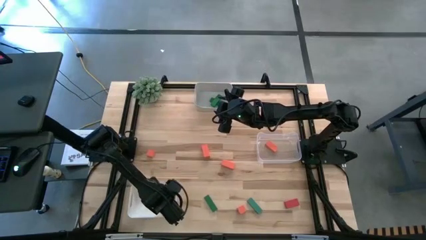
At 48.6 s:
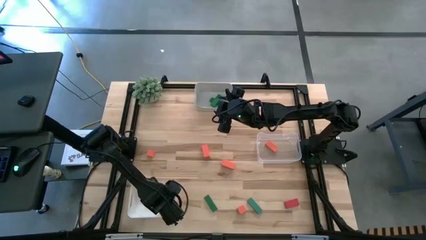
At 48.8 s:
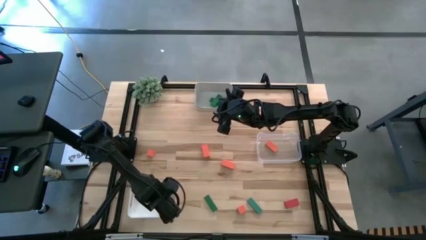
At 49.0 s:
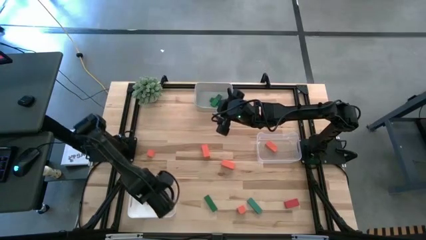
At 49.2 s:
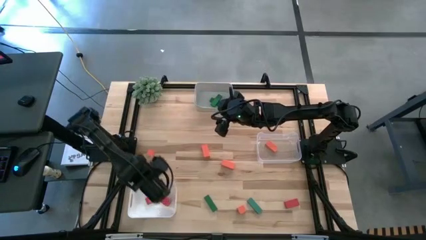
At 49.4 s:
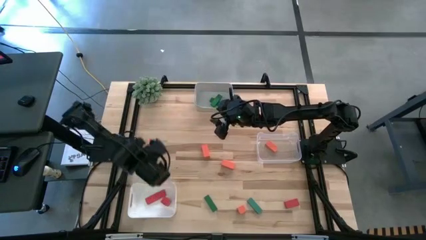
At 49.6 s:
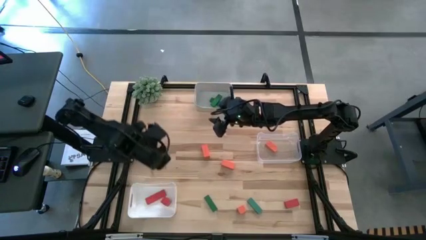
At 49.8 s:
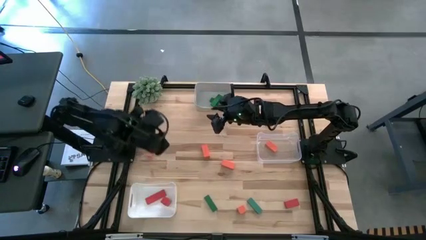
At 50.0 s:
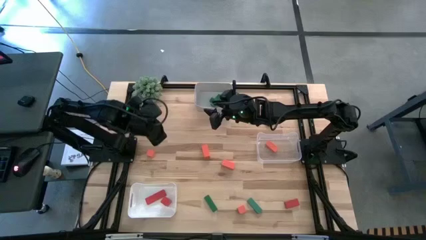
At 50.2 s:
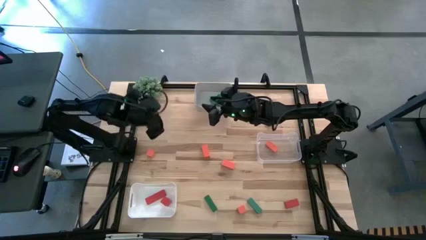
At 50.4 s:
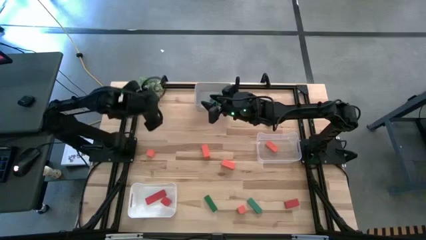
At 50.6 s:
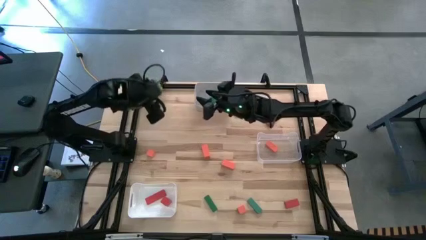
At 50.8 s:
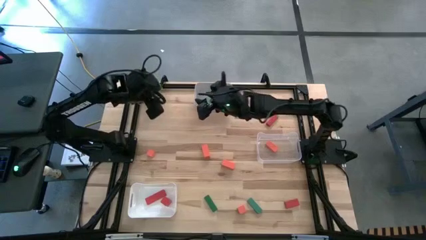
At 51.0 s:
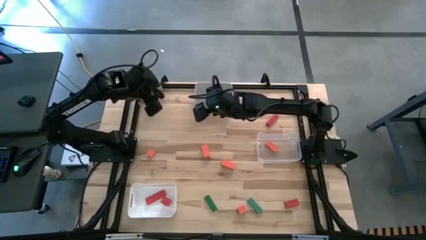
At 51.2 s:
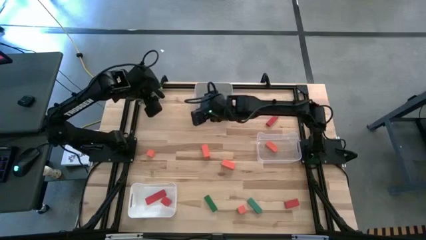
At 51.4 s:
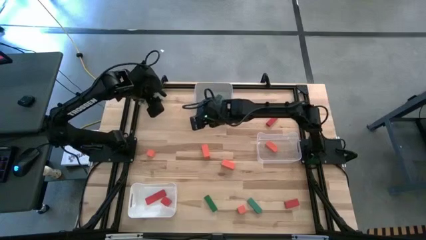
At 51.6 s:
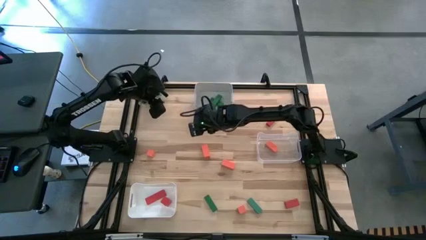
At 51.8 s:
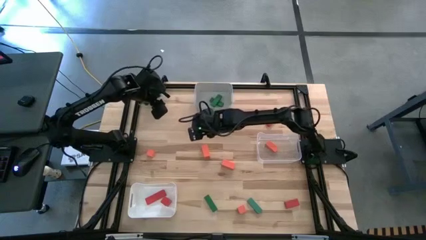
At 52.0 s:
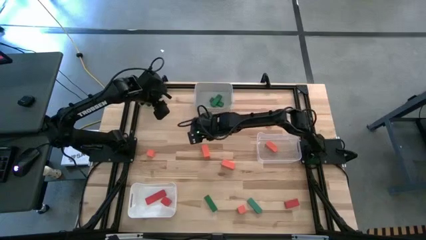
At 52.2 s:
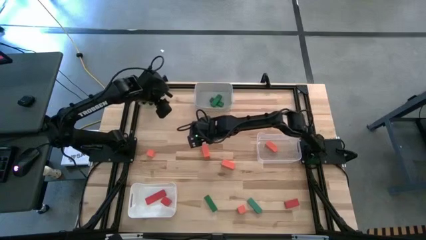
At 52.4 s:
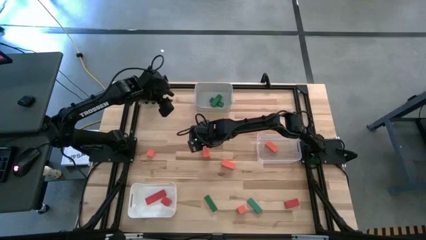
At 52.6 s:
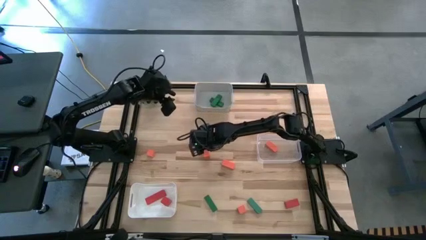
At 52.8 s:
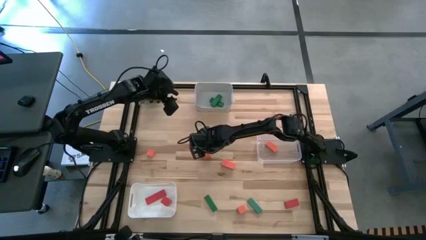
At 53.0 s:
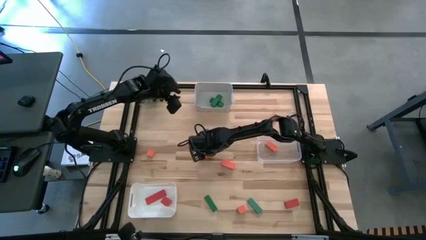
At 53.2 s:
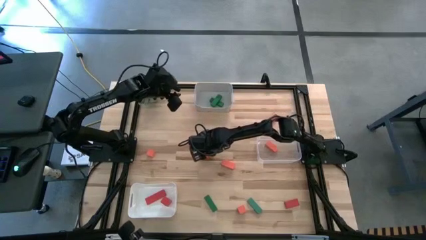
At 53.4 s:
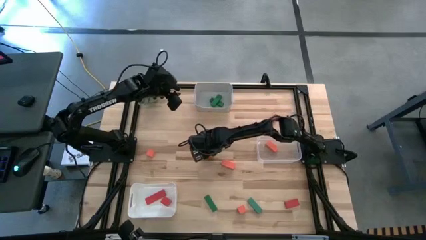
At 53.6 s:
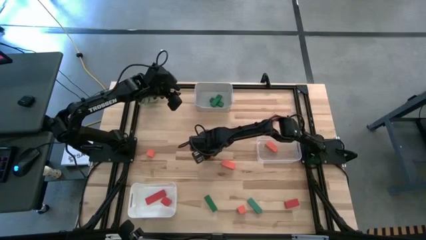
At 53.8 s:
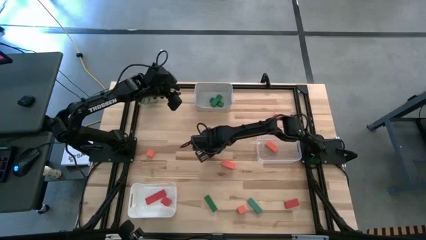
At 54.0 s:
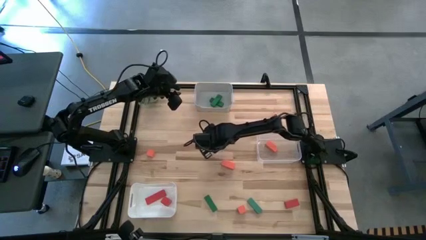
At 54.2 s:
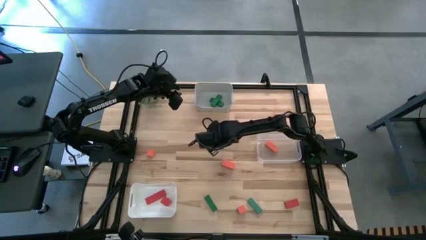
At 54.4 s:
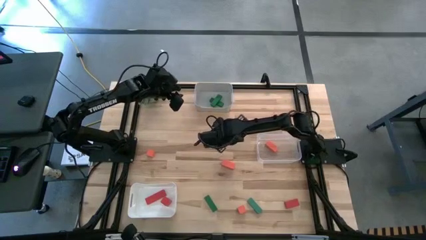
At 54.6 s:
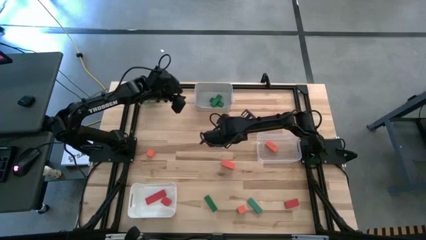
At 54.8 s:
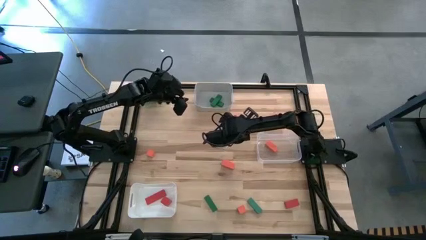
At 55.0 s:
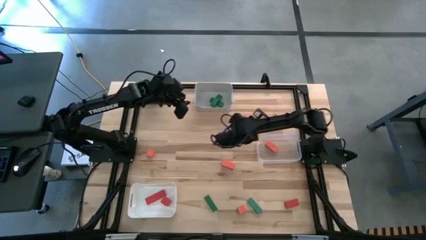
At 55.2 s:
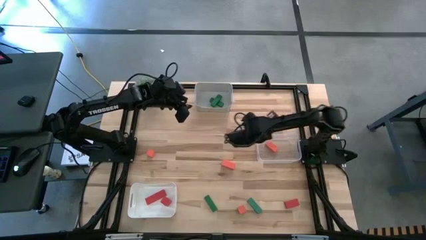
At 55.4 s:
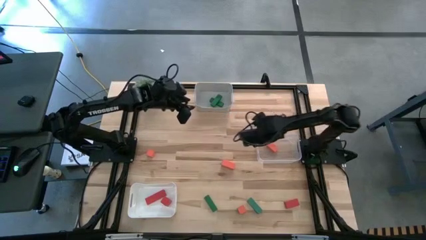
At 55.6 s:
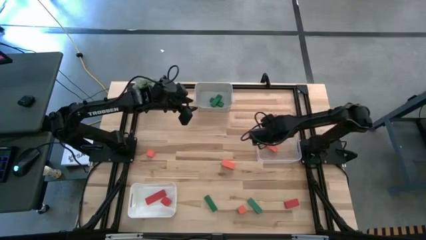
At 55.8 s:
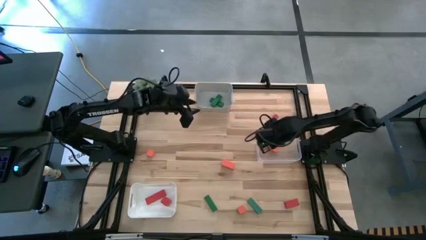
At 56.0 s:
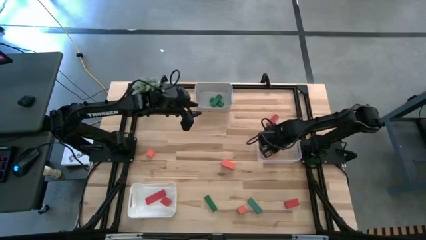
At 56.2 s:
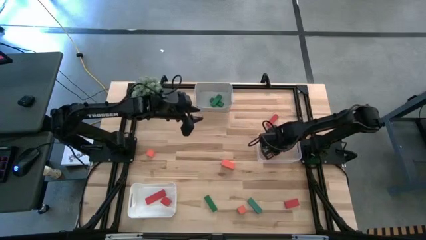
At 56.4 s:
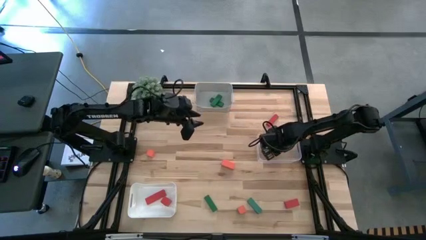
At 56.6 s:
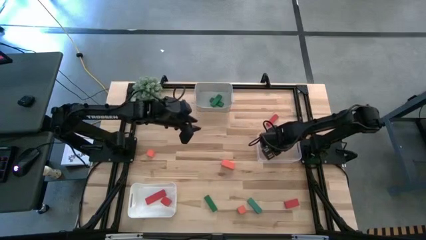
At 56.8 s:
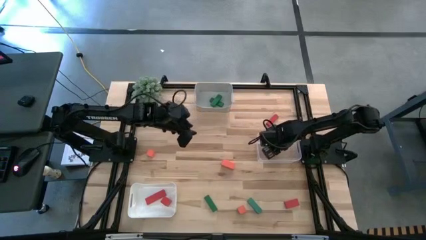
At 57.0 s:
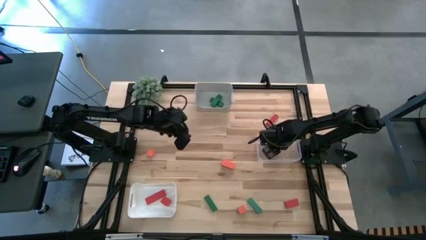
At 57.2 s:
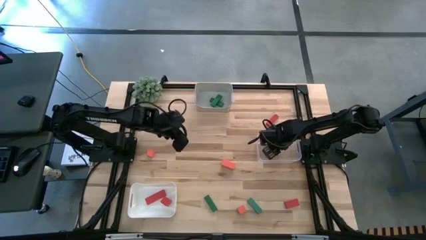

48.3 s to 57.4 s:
Task: Sort & place blocks by color
Put the orange block into the transparent bin

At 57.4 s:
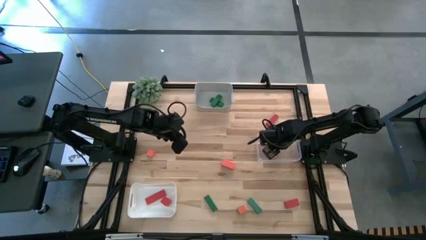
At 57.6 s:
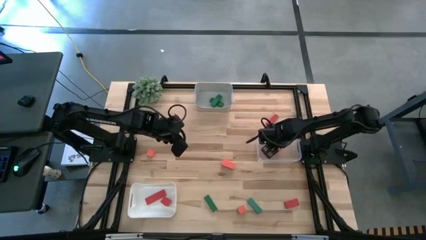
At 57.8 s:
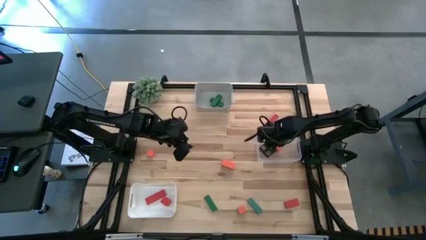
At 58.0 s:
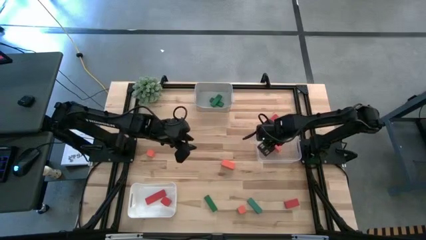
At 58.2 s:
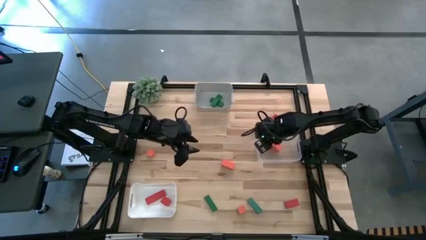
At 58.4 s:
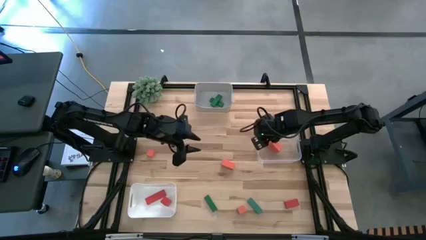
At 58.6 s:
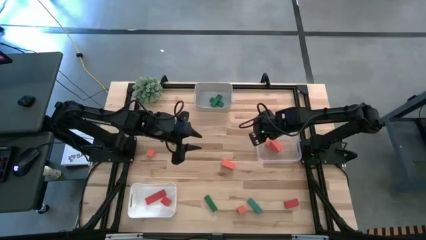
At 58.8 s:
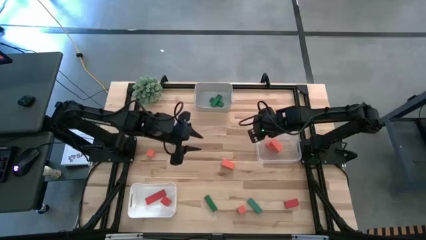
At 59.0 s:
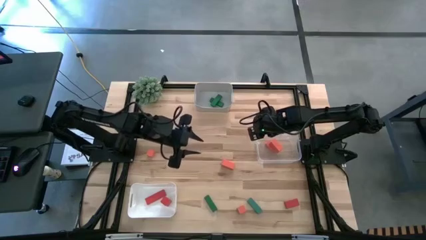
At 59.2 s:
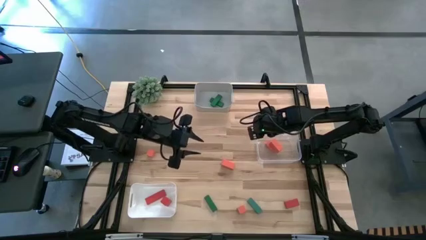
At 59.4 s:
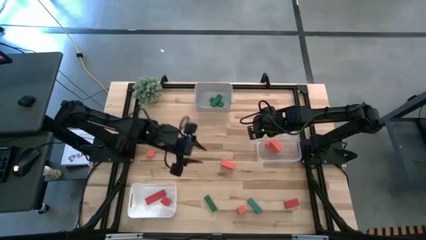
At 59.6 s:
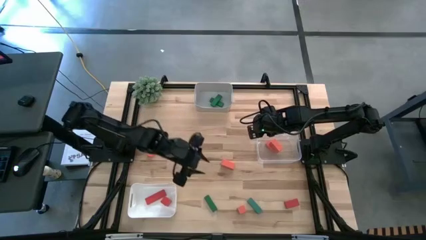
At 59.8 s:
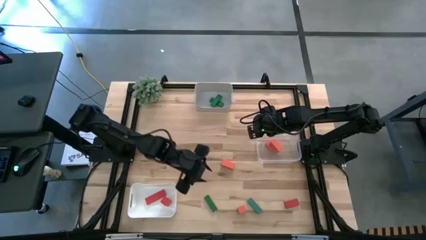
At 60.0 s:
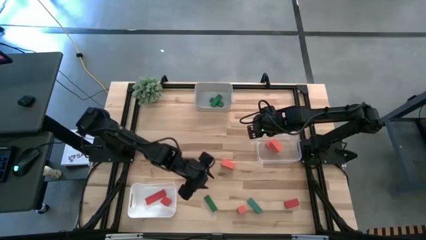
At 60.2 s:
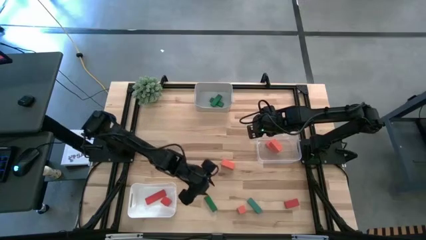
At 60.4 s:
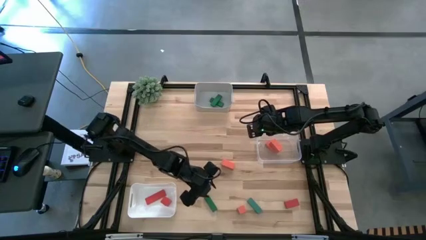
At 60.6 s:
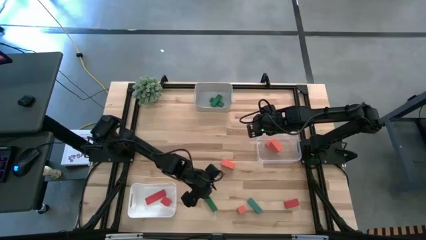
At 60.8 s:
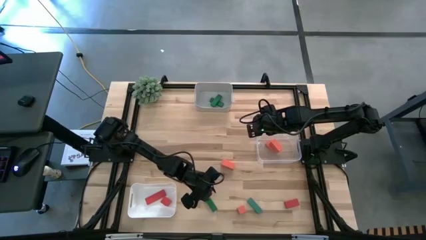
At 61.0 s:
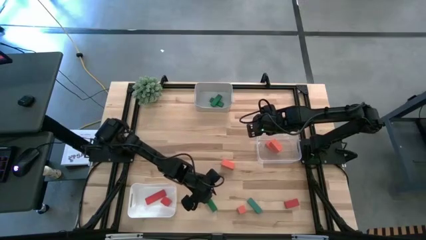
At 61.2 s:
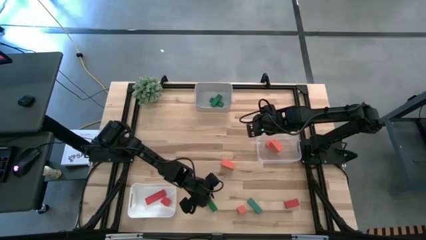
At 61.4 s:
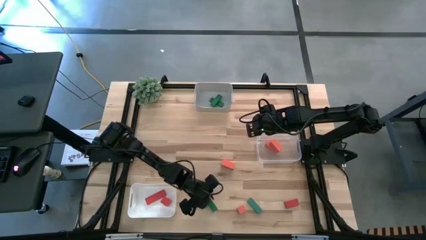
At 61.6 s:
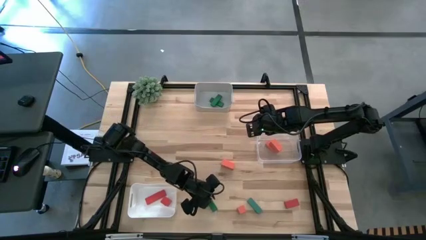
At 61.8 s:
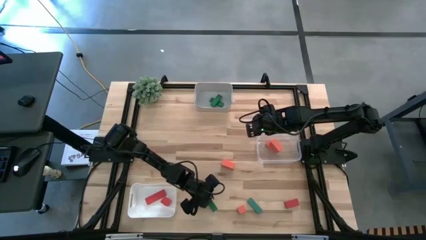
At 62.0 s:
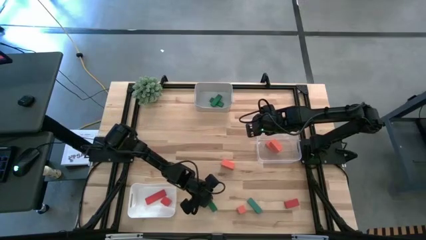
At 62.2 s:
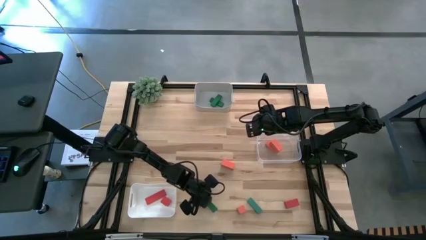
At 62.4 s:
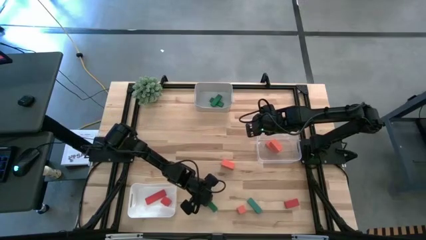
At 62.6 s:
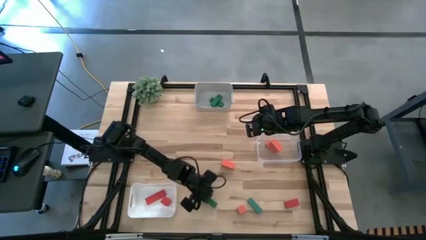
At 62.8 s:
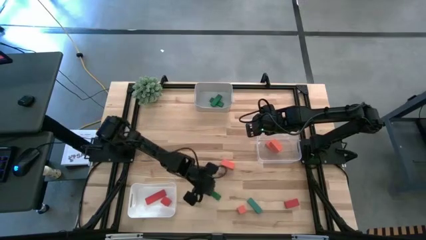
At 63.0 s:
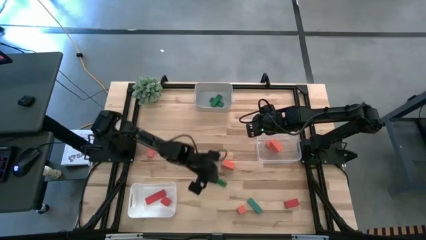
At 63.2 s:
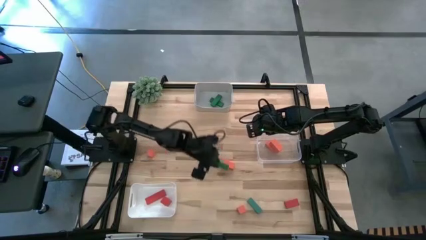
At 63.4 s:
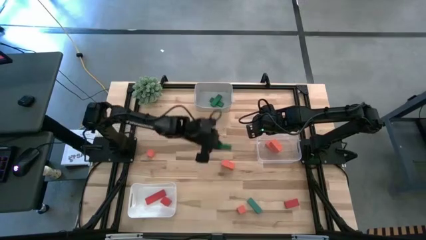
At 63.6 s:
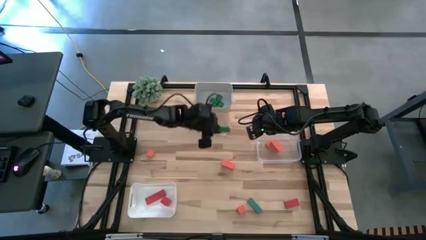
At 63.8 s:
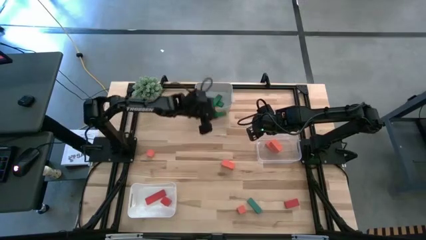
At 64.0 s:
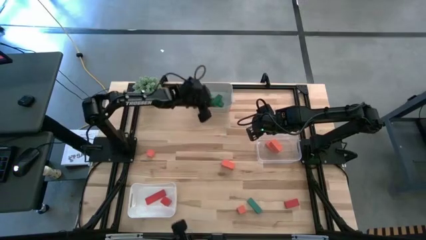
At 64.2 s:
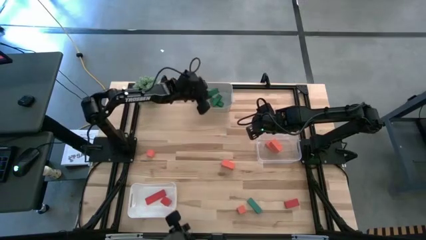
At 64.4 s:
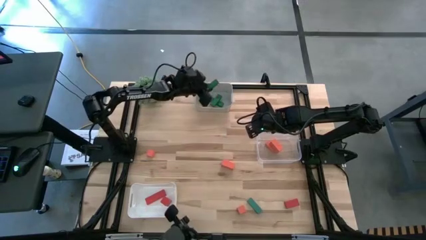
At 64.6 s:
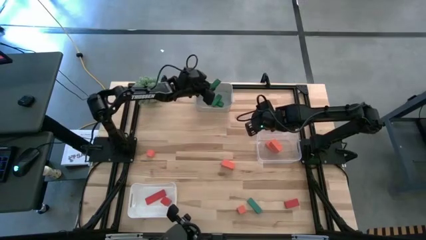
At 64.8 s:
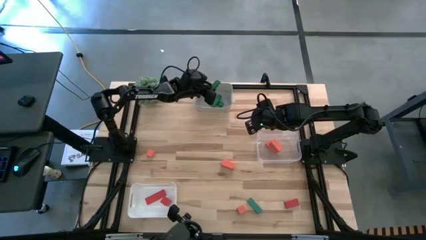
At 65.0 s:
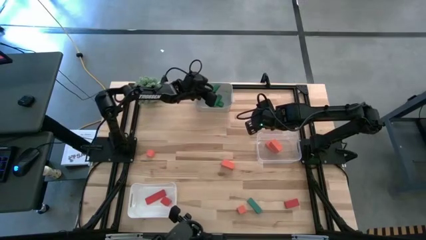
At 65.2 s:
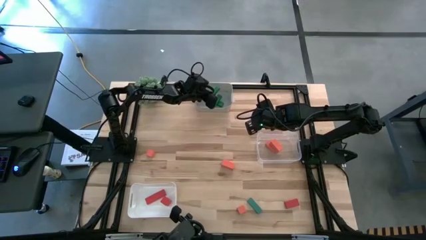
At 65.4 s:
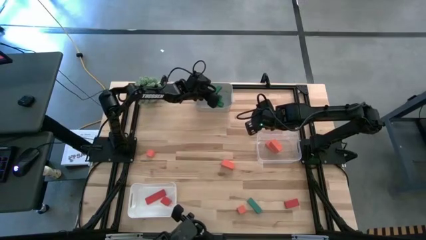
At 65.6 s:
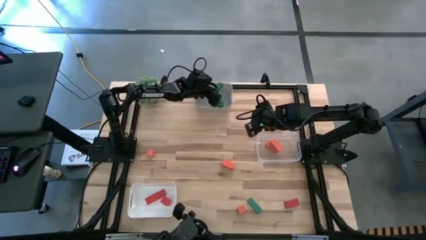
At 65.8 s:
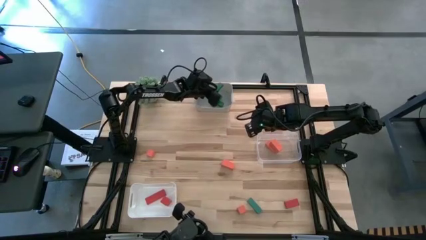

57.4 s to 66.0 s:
Put the green block into the gray bin
